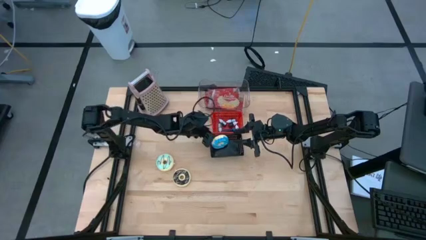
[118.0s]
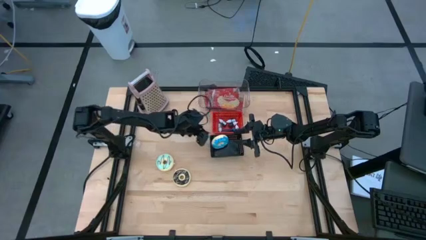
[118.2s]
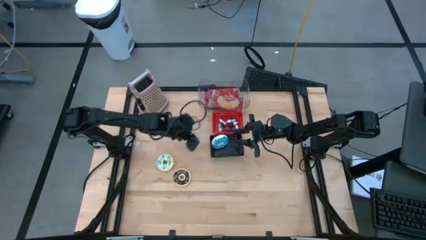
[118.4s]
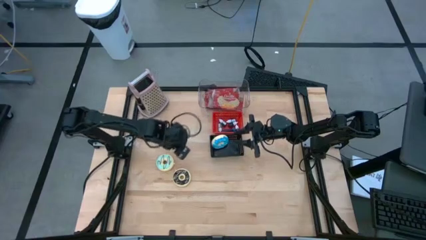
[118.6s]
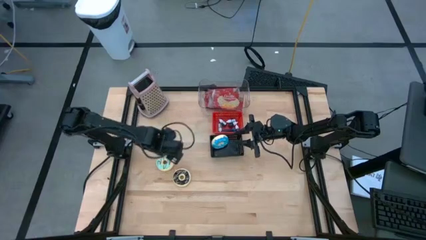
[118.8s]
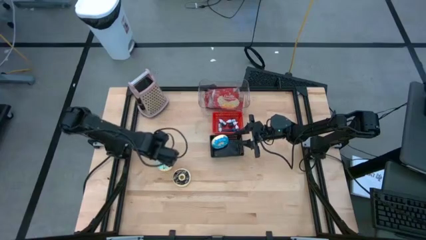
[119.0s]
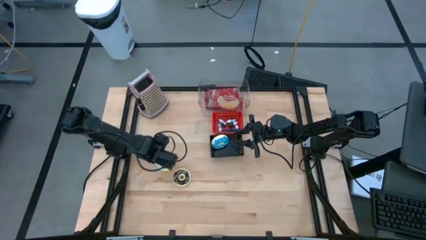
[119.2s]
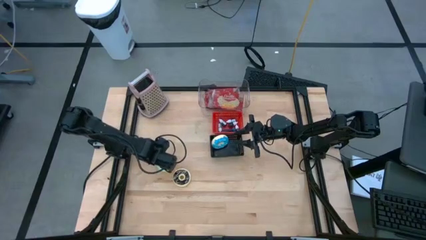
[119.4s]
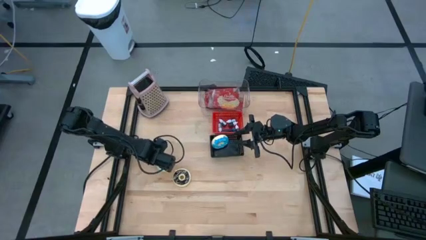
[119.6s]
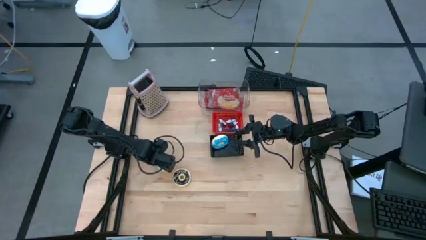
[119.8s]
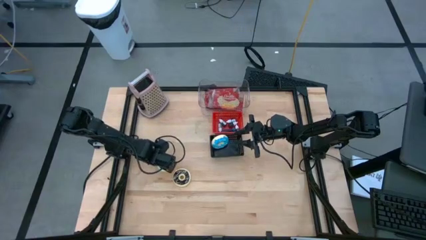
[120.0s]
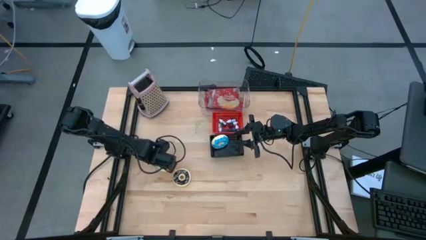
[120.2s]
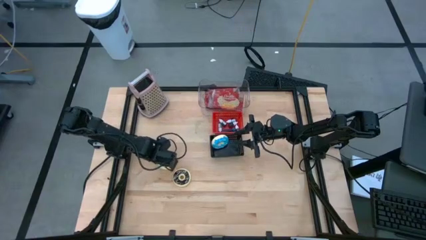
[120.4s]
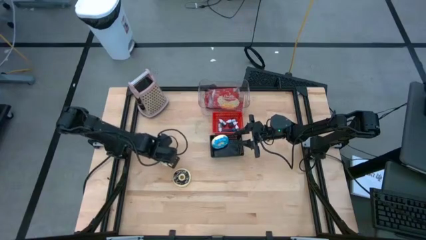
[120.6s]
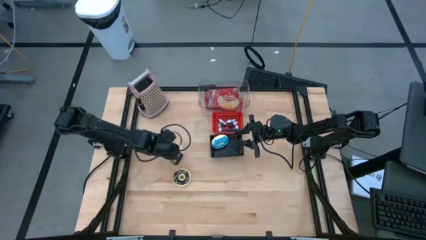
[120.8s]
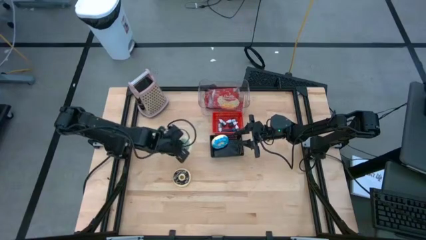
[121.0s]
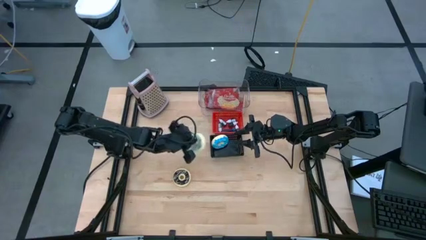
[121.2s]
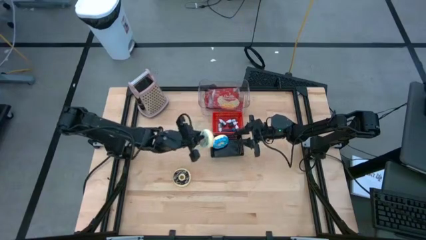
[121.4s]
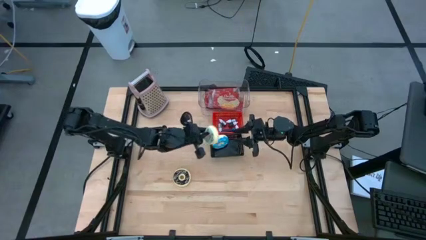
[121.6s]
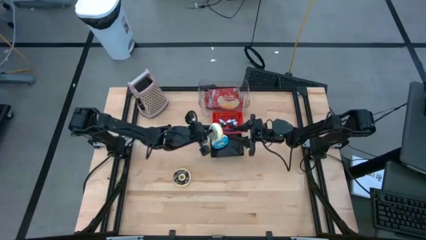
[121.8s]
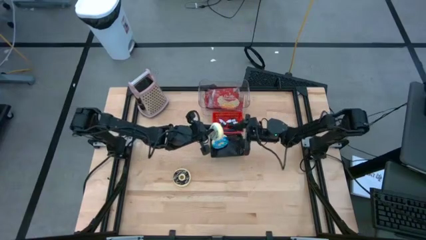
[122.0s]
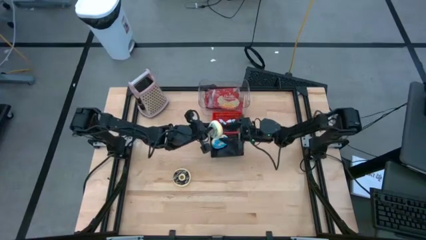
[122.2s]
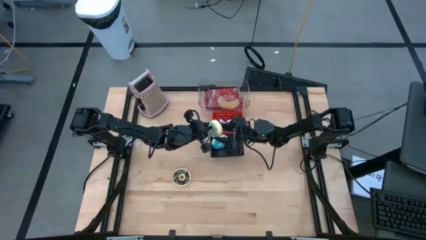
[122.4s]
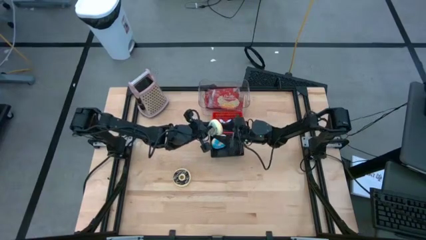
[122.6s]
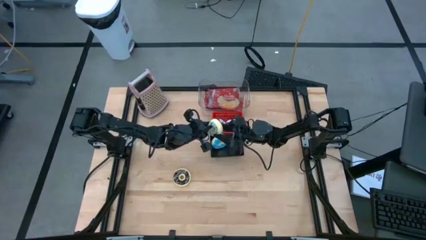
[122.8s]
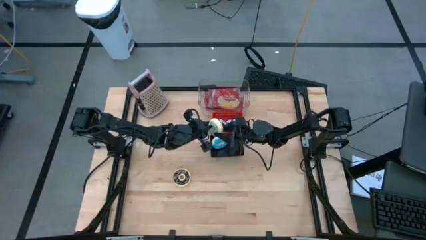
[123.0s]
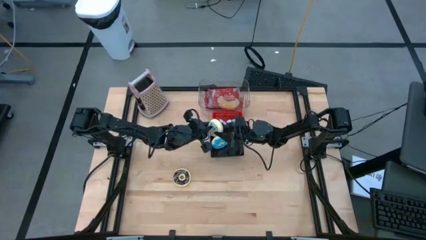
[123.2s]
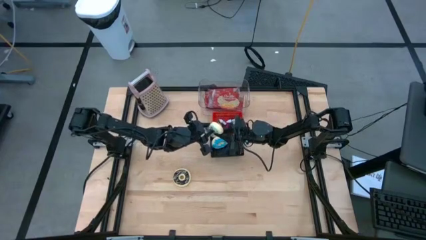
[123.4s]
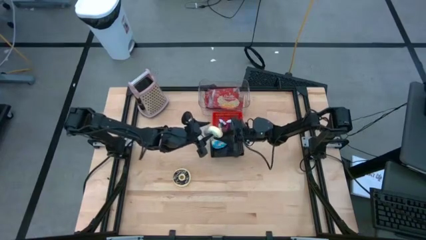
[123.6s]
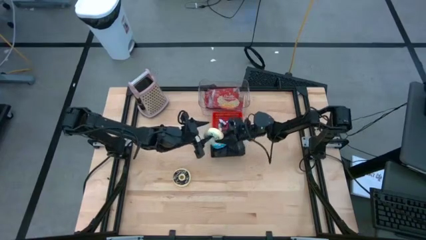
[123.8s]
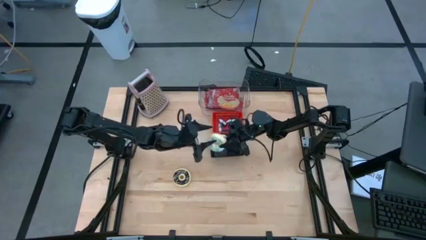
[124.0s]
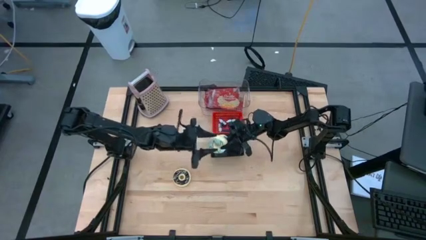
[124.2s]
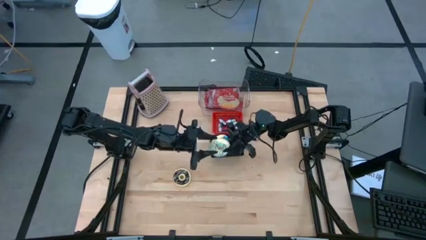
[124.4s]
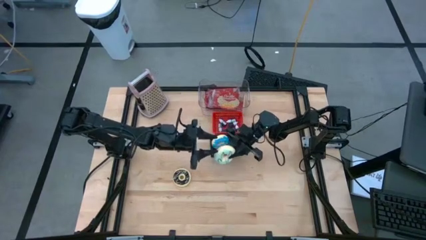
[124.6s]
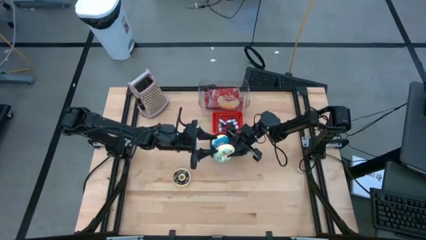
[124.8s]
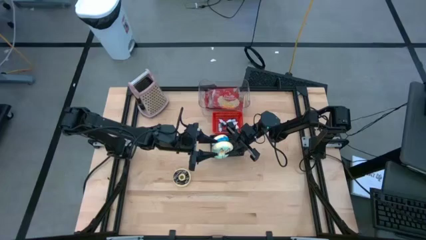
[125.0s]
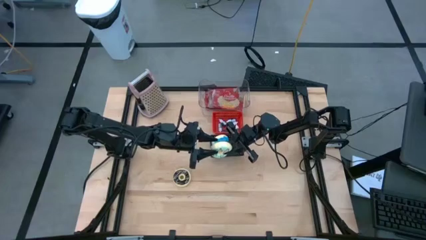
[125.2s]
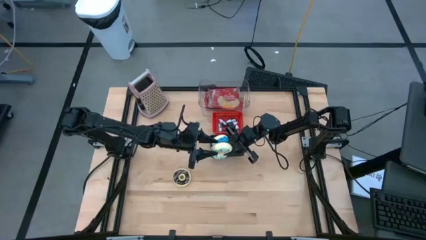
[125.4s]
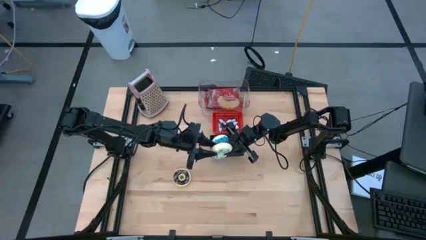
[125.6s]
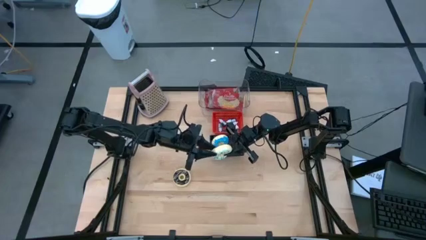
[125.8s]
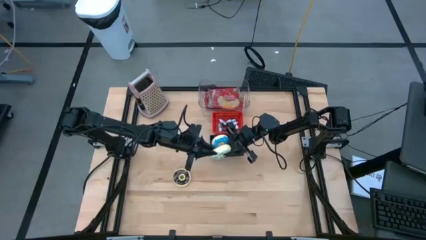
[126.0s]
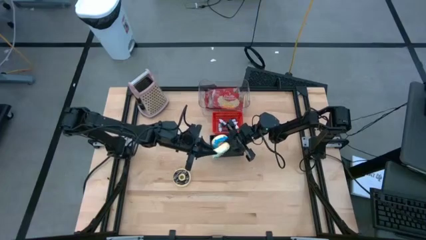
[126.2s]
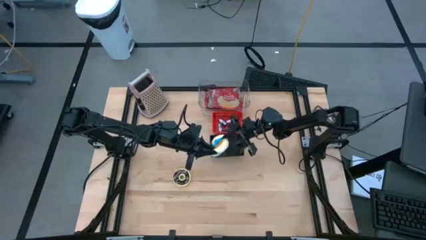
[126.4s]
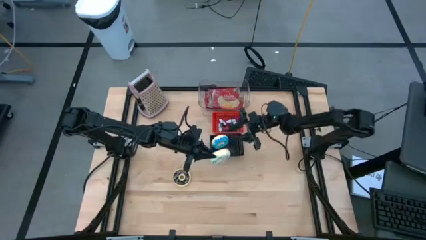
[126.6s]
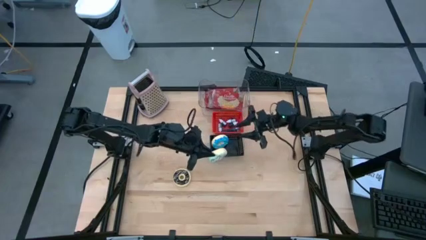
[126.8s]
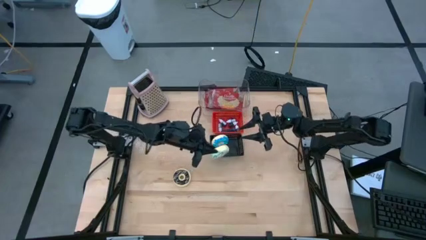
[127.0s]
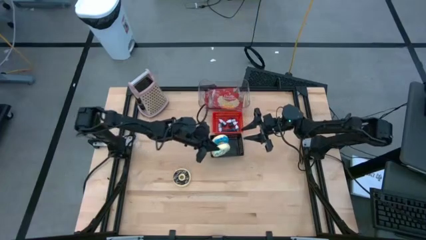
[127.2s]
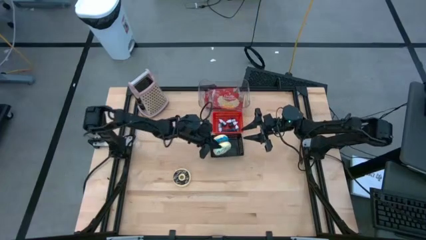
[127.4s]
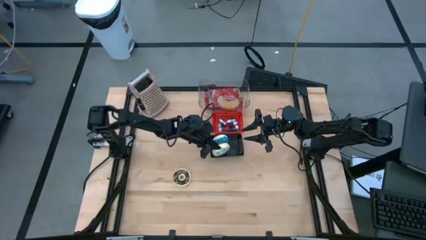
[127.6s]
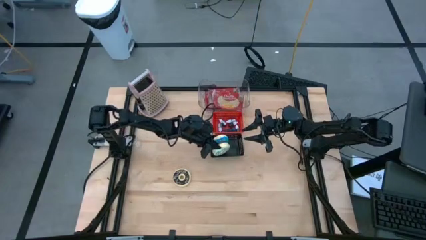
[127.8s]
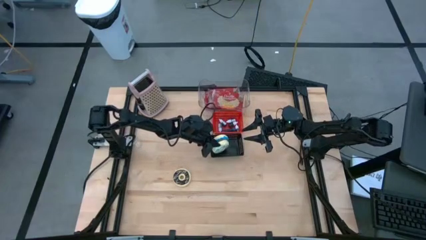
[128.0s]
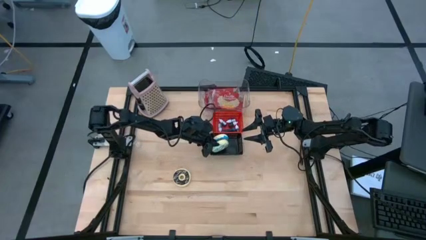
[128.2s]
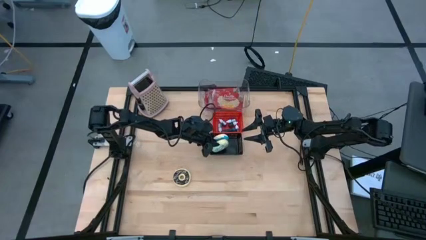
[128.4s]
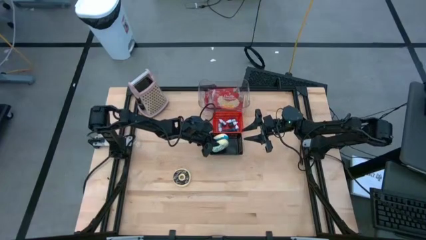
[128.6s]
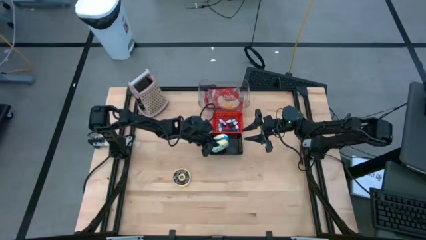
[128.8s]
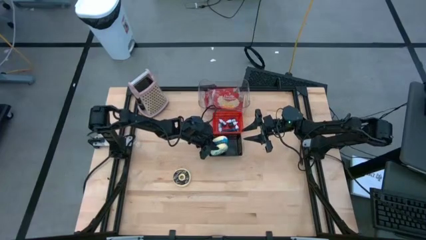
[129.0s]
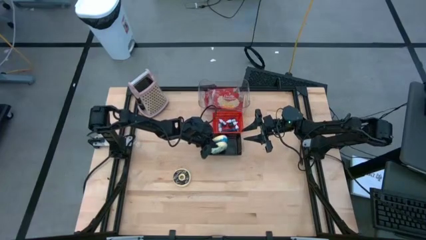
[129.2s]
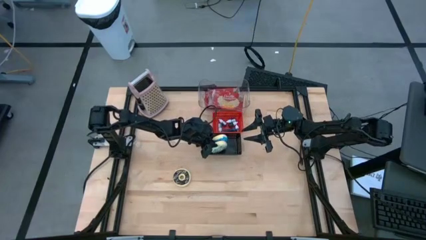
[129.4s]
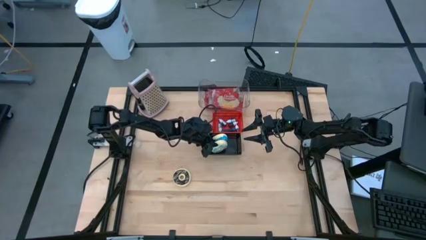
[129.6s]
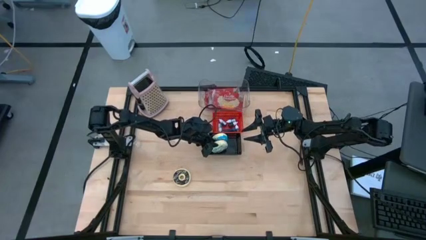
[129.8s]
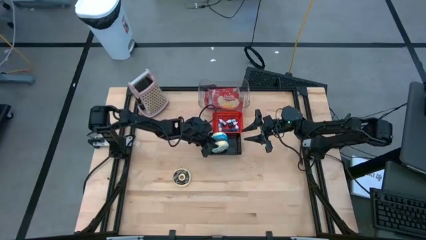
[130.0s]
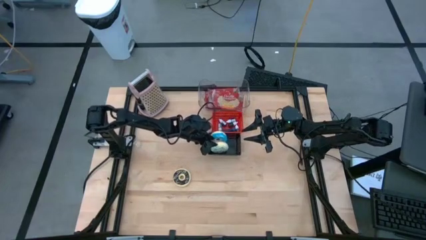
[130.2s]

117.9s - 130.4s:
Put the green doughnut into the black bin

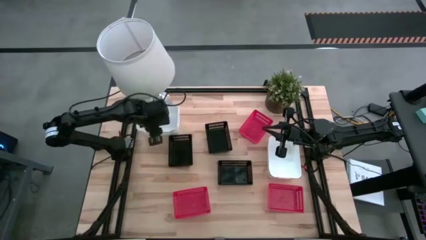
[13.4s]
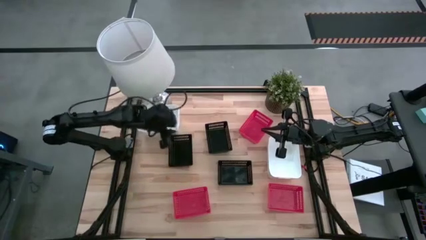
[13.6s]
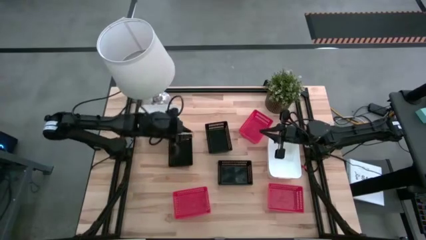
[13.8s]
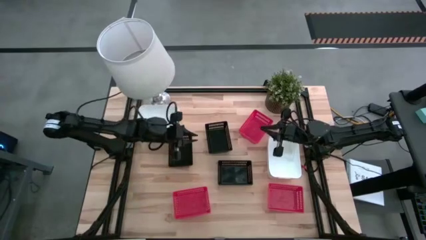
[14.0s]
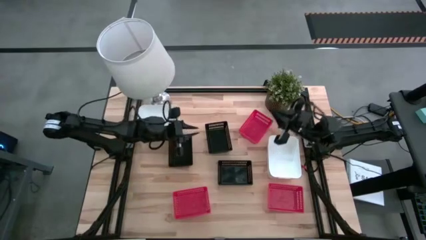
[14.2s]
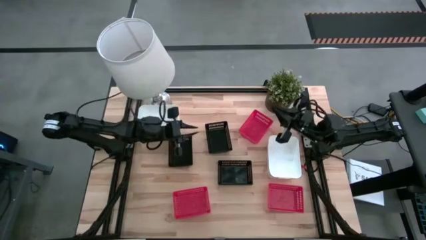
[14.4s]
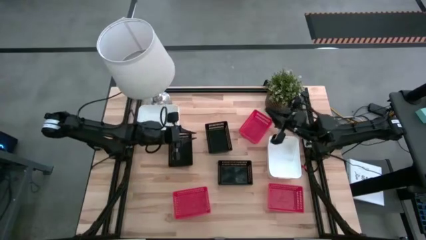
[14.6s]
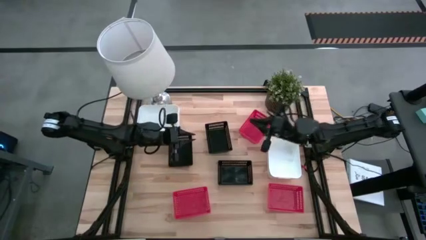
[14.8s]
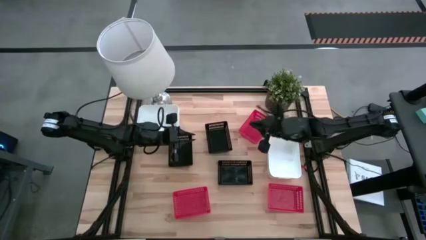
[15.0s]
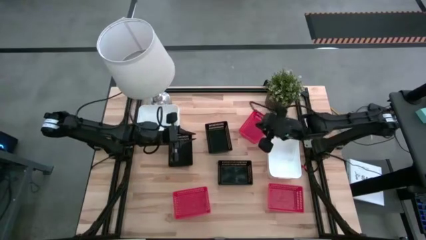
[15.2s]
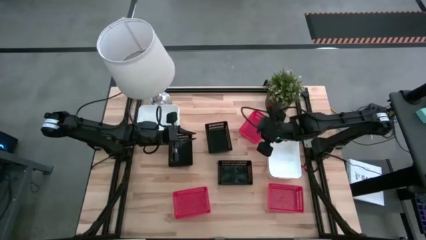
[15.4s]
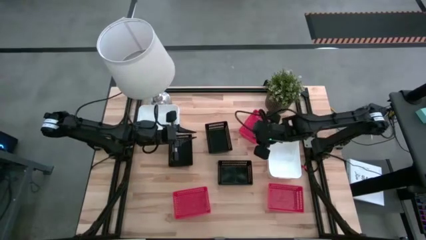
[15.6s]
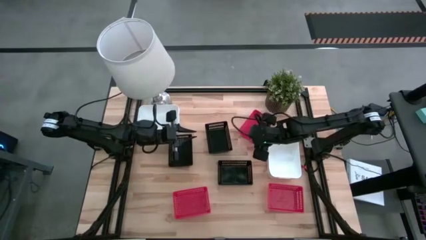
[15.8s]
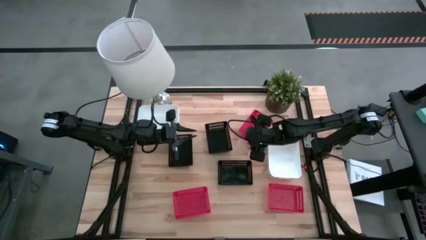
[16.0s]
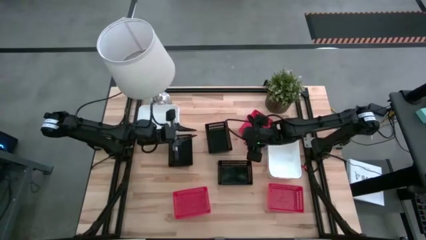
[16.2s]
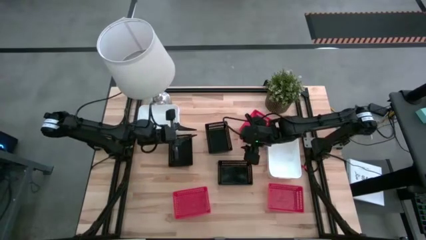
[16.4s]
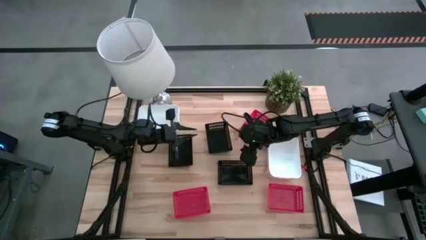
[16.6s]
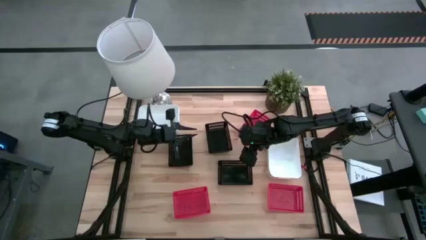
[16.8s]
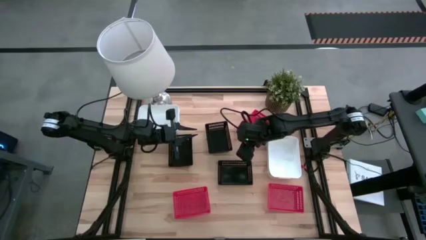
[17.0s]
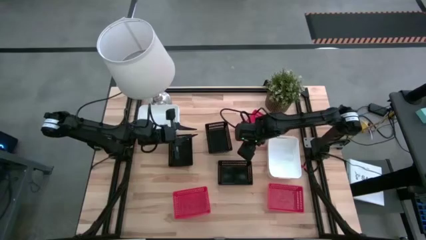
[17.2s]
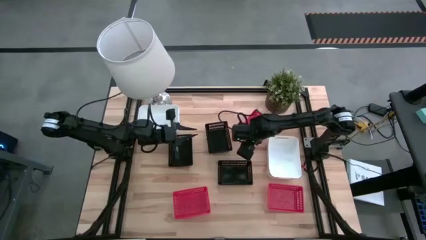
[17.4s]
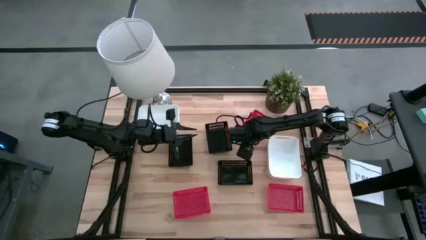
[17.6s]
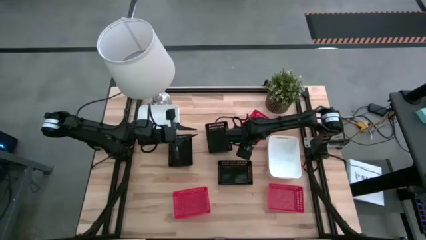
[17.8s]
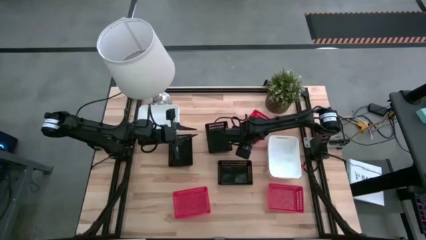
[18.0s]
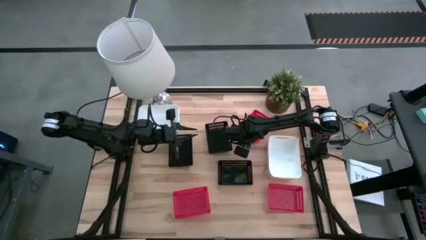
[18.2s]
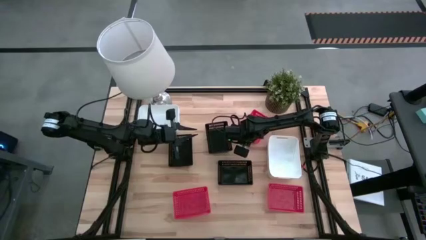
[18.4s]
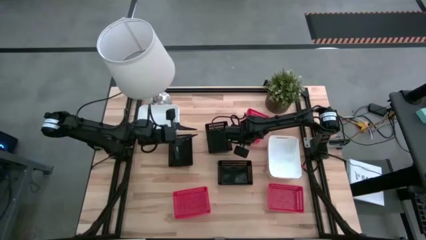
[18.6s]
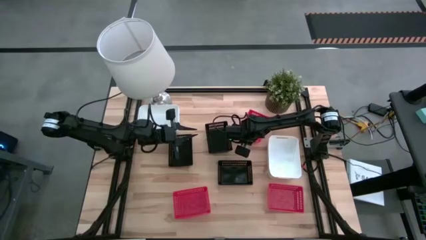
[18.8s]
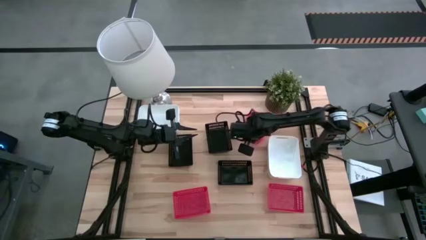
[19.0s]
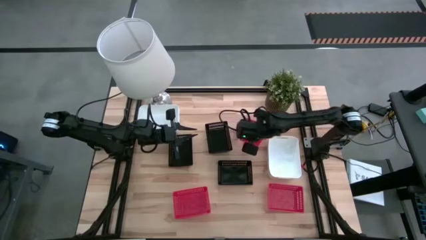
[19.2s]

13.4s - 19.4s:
Stack the top red bin on top of the bottom left red bin
